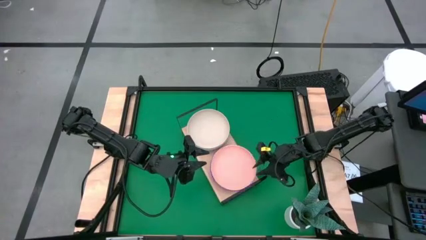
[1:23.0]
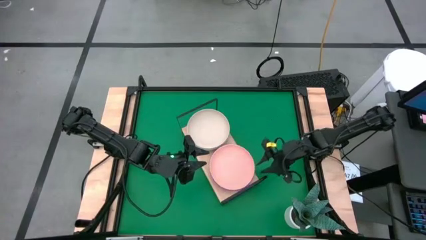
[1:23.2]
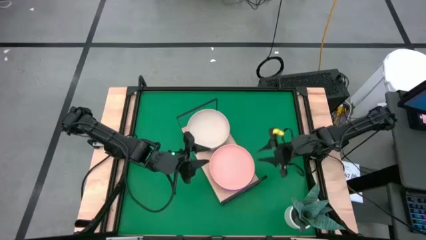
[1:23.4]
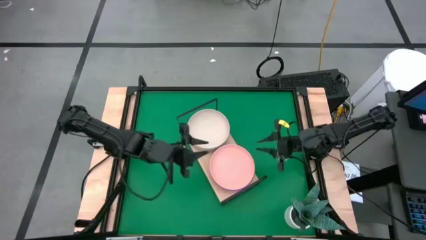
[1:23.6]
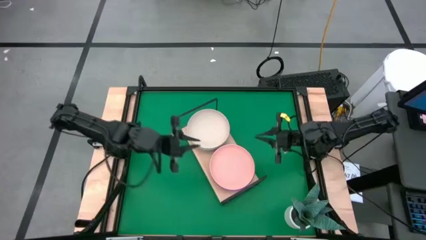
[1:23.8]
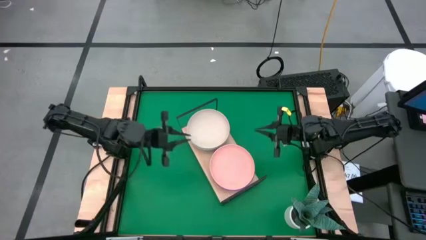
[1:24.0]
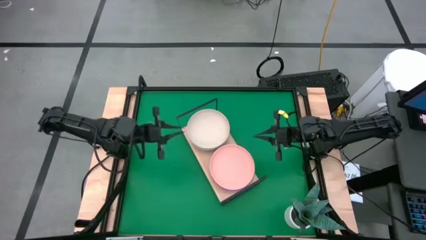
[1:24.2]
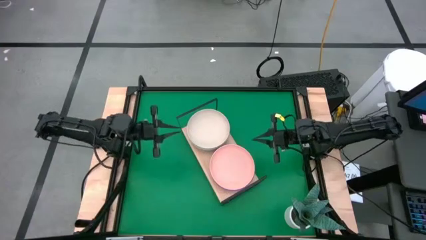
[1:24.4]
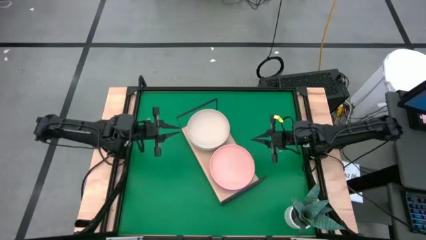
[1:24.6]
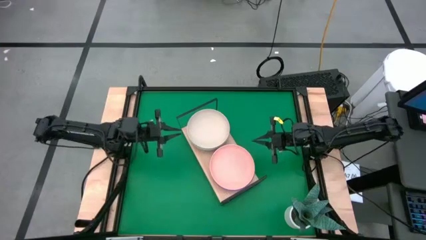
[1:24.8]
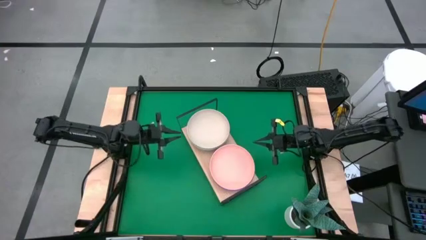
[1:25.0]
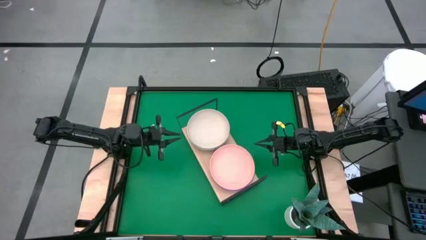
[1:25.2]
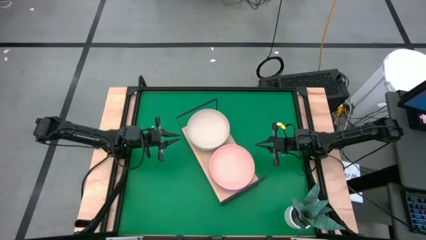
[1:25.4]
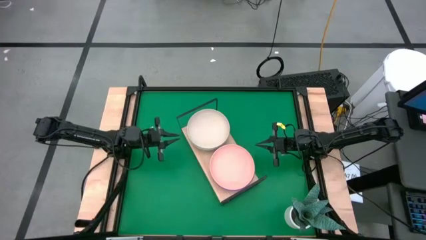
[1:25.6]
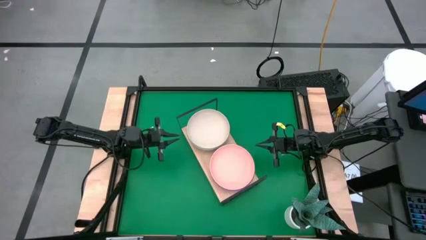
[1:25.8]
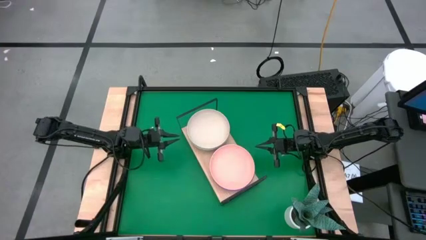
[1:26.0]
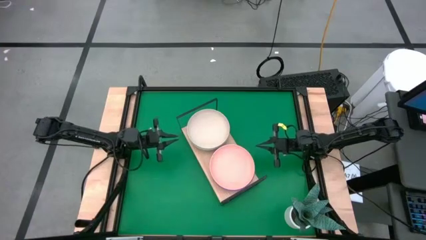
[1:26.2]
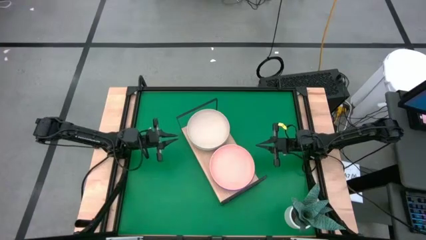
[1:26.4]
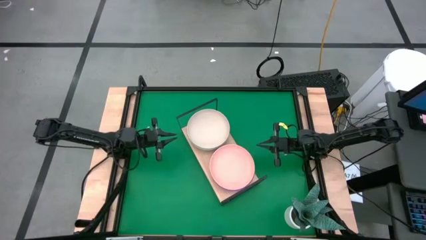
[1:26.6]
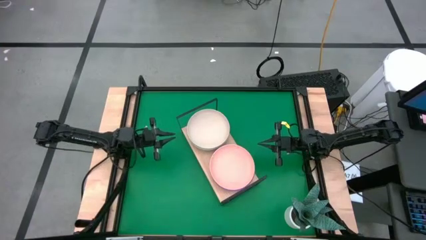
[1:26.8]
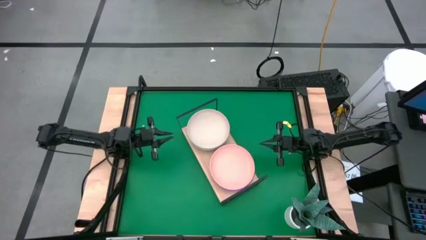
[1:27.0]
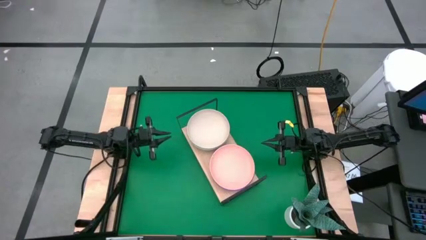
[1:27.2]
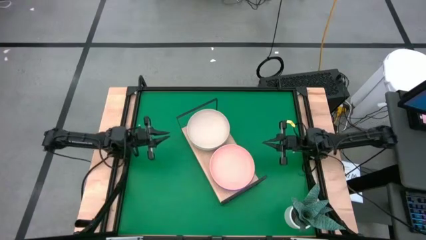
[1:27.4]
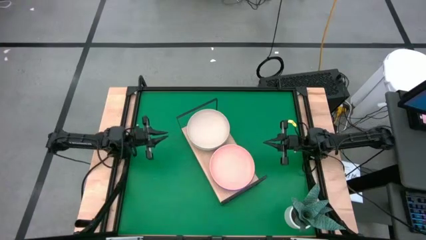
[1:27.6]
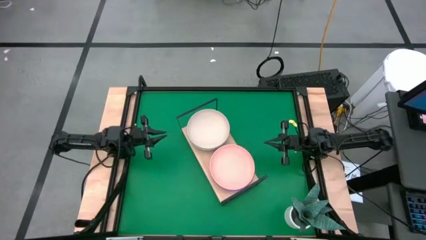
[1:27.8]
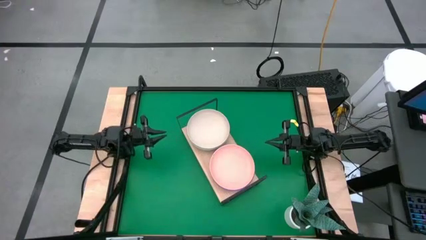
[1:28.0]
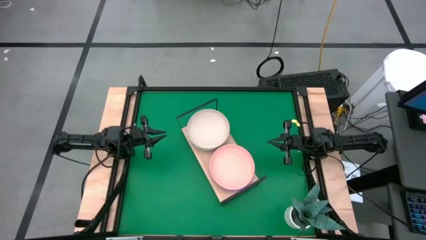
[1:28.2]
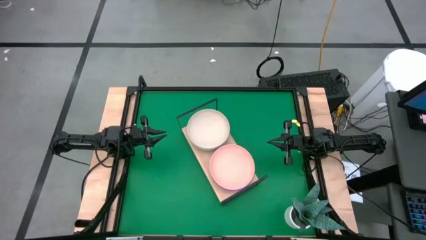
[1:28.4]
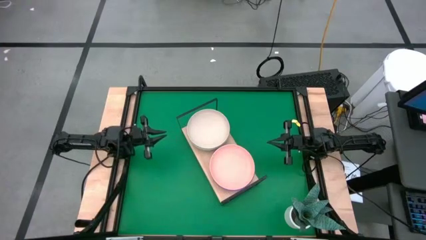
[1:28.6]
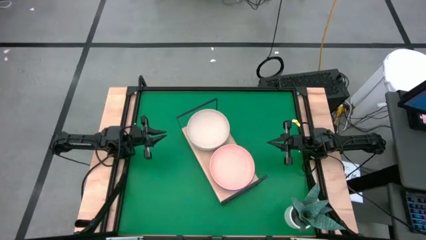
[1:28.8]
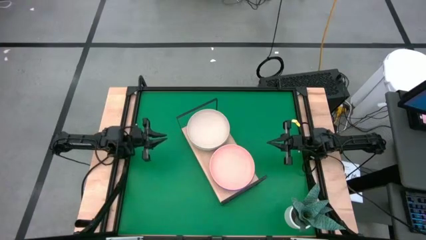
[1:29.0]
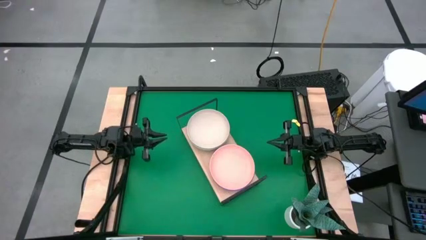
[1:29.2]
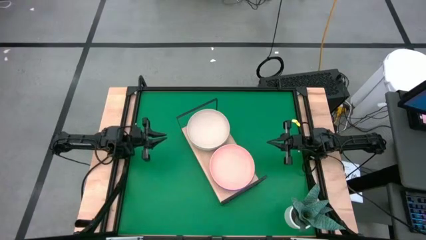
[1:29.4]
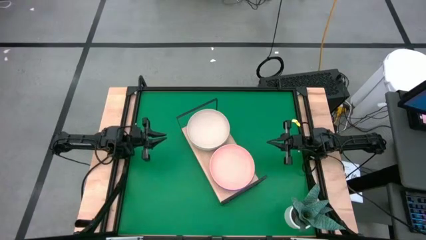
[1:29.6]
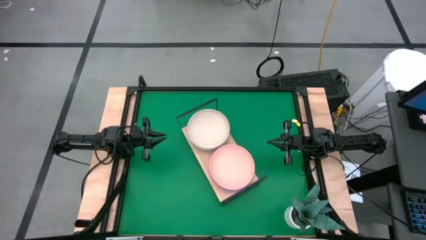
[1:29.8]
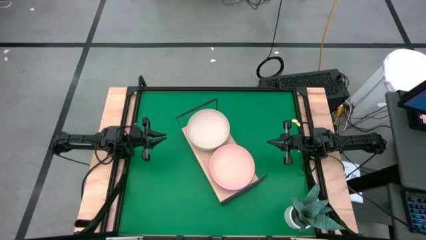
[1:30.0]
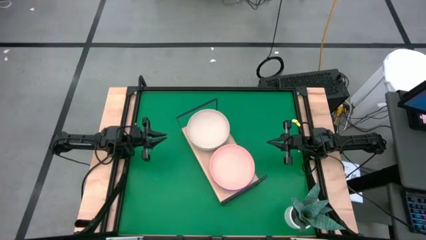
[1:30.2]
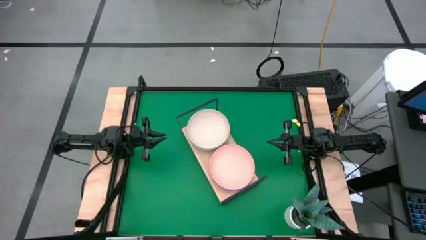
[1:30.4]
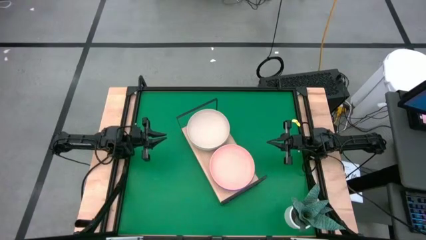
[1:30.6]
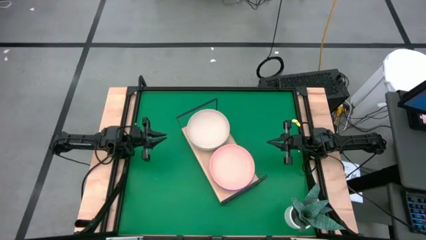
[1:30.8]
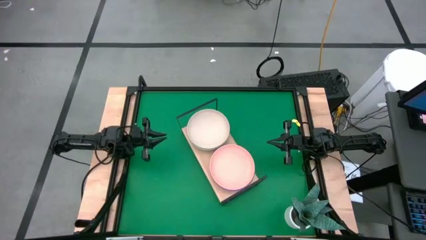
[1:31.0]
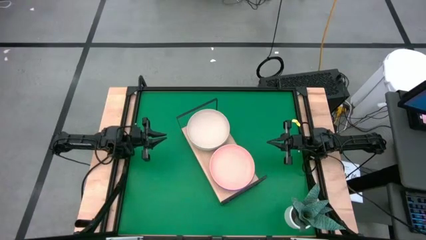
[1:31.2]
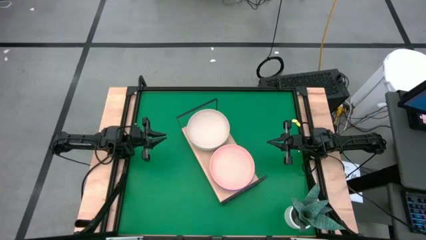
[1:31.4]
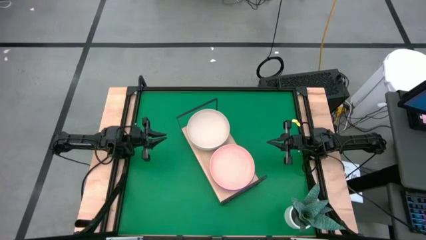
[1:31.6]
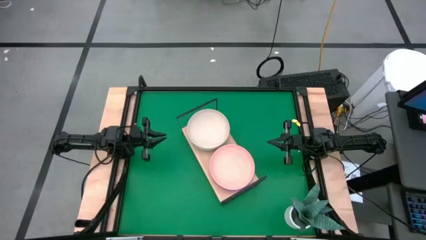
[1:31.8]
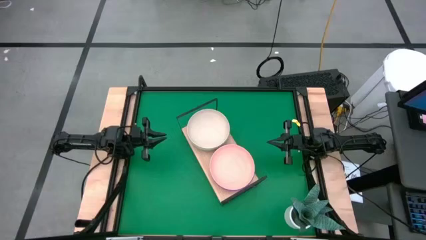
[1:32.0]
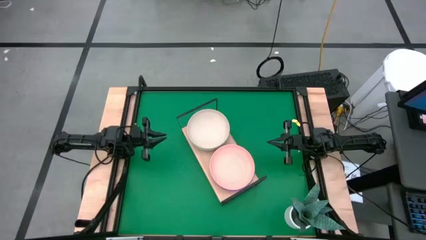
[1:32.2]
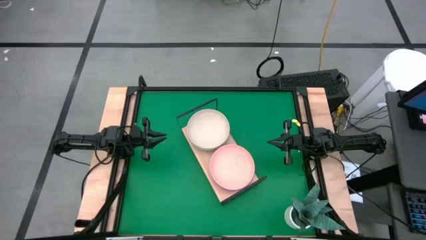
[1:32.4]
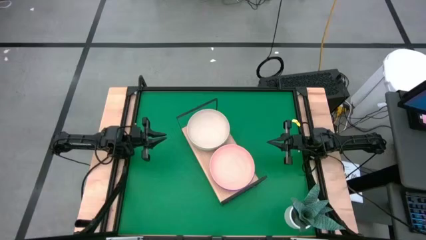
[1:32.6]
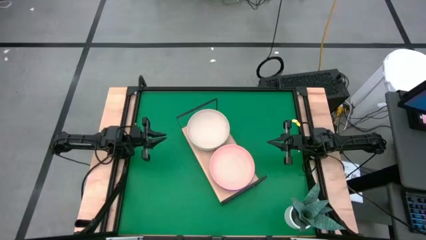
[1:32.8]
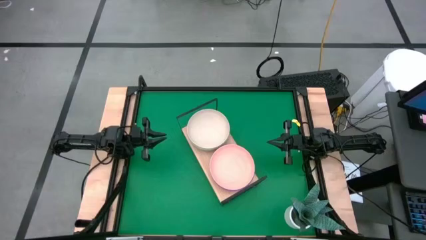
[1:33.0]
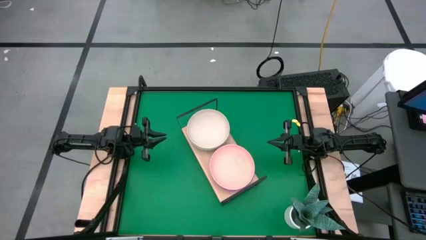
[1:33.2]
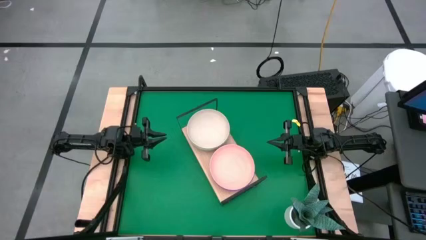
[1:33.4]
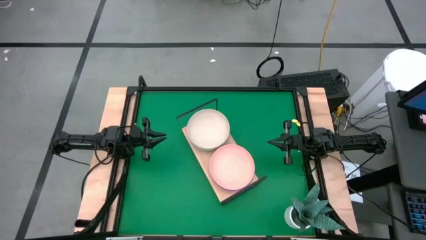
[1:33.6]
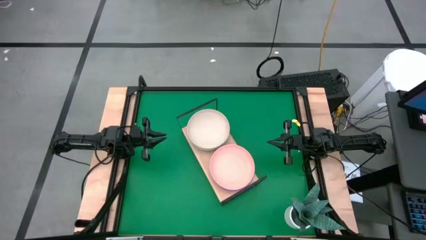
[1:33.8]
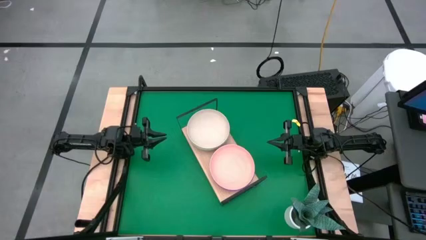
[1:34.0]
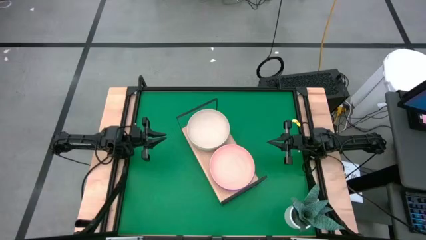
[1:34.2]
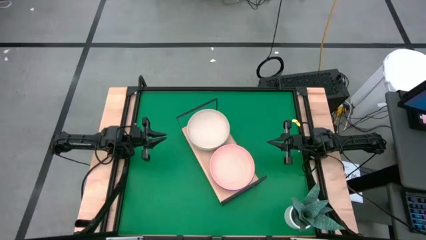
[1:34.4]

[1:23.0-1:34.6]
Task: Place and stack plates onto a shelf
Return to Home Position
